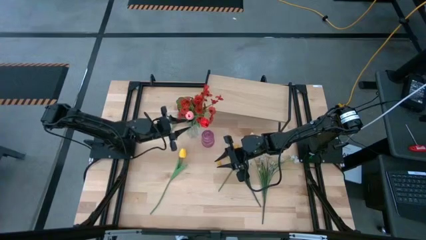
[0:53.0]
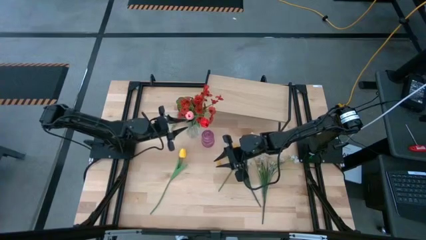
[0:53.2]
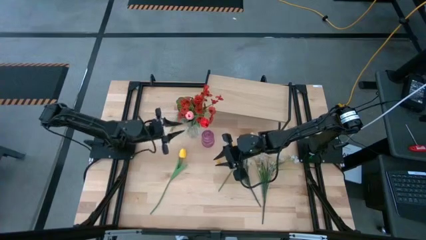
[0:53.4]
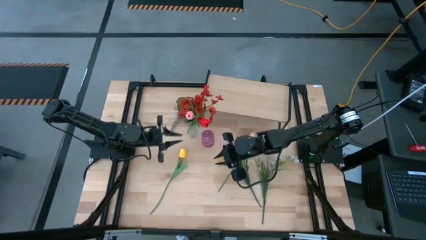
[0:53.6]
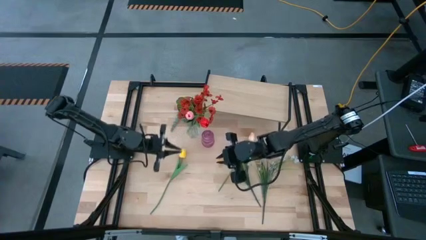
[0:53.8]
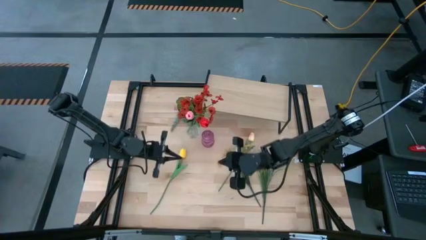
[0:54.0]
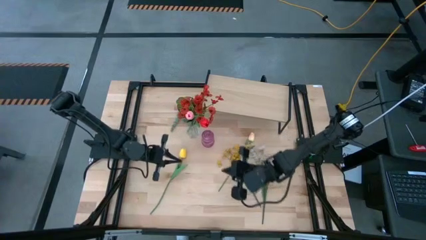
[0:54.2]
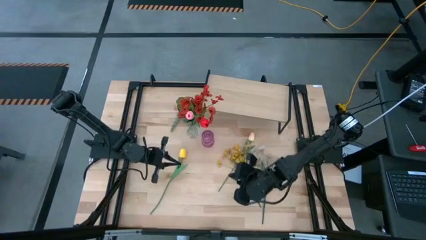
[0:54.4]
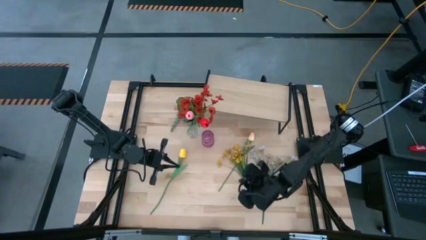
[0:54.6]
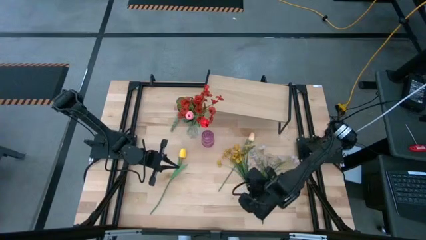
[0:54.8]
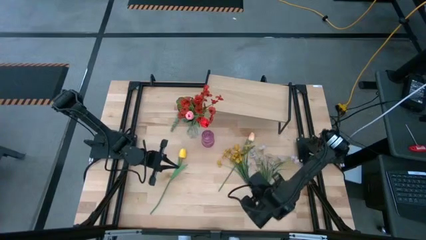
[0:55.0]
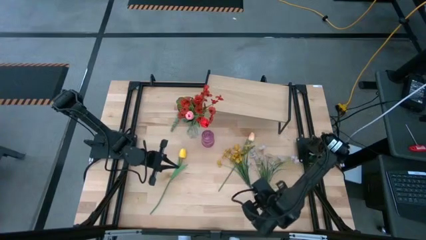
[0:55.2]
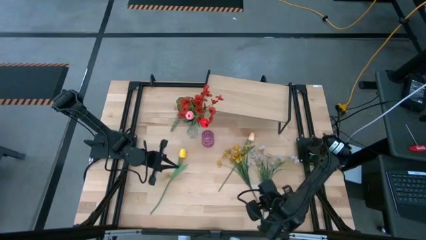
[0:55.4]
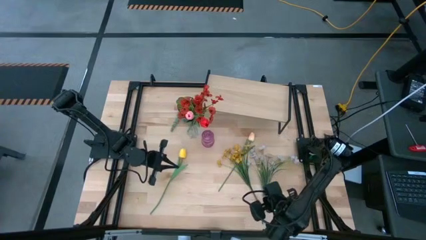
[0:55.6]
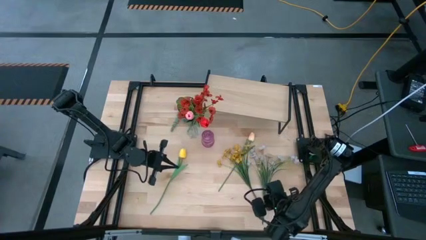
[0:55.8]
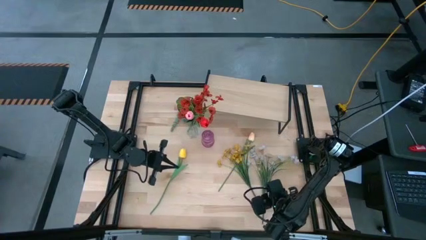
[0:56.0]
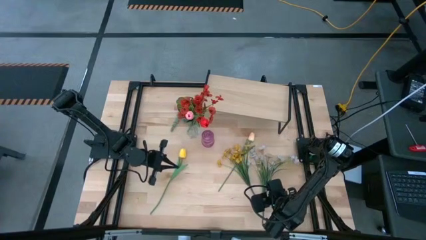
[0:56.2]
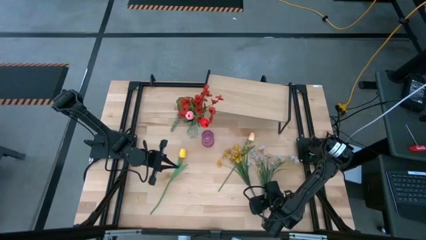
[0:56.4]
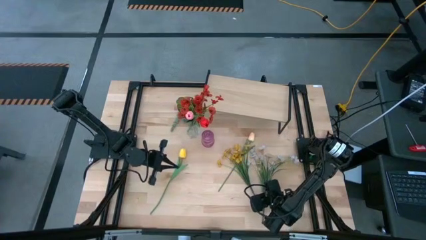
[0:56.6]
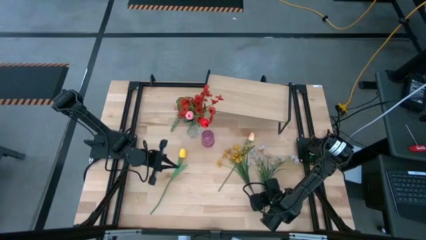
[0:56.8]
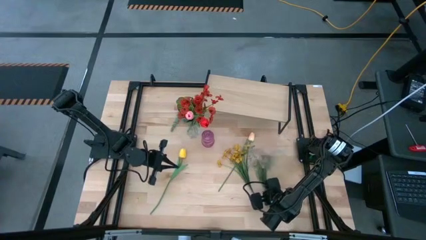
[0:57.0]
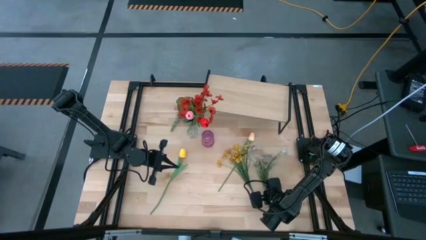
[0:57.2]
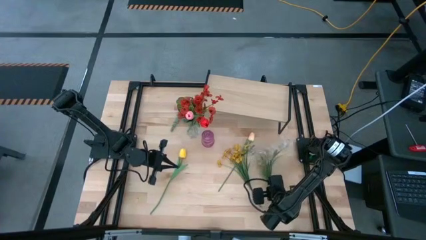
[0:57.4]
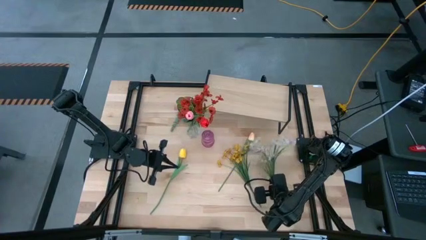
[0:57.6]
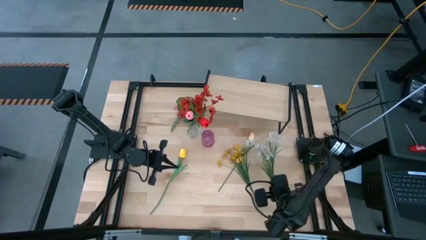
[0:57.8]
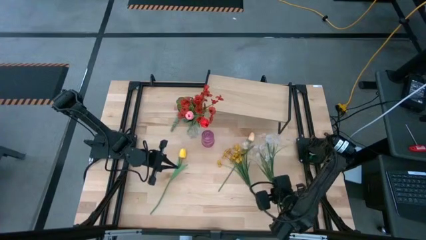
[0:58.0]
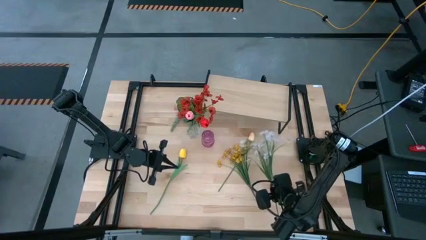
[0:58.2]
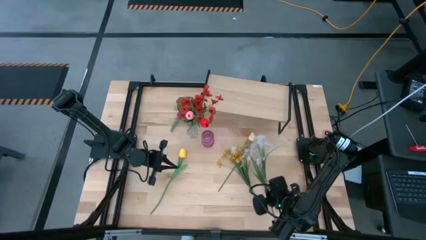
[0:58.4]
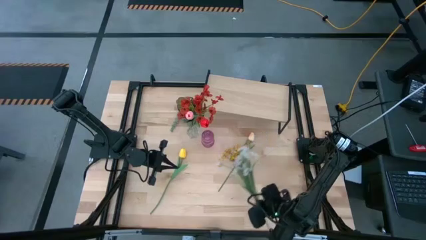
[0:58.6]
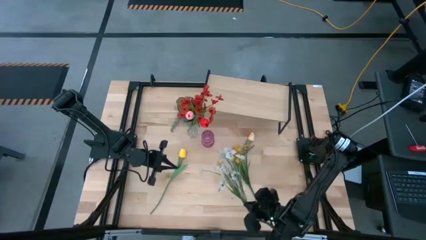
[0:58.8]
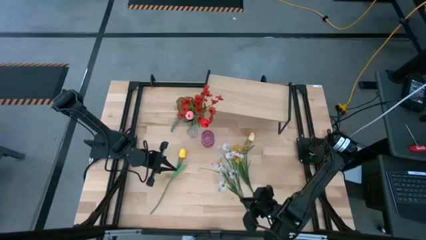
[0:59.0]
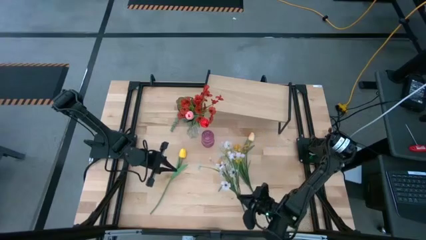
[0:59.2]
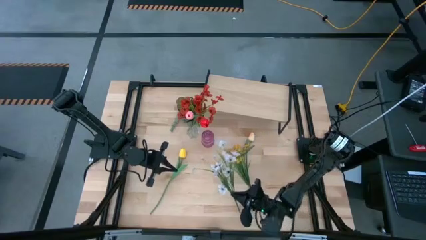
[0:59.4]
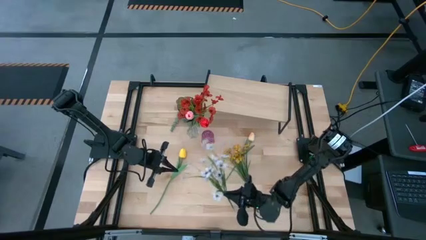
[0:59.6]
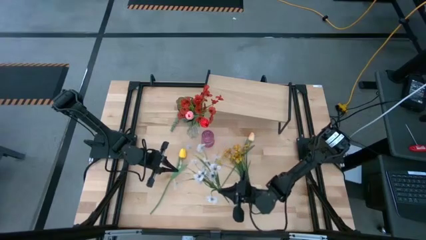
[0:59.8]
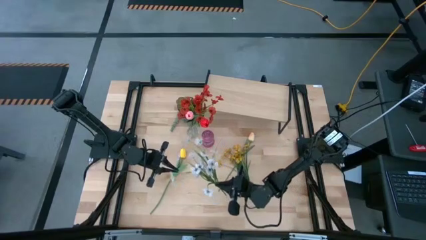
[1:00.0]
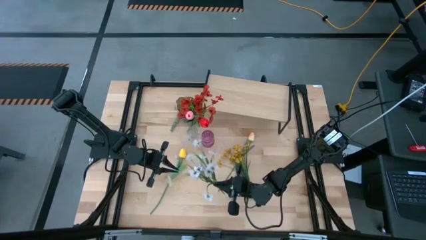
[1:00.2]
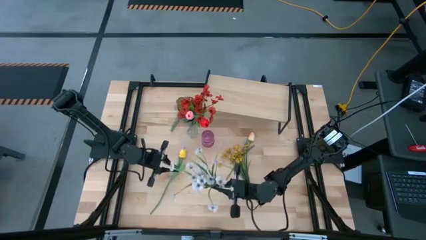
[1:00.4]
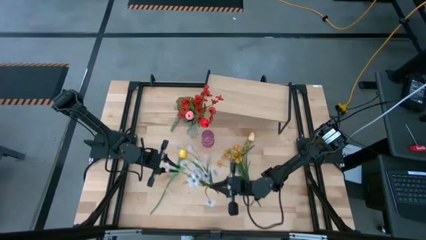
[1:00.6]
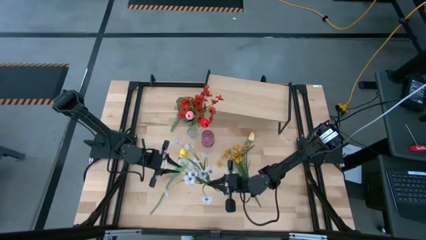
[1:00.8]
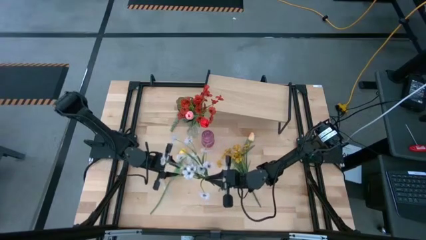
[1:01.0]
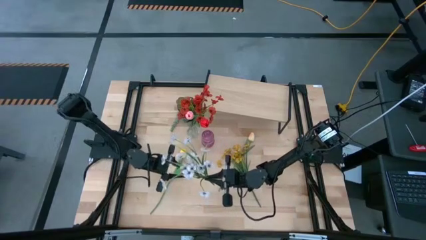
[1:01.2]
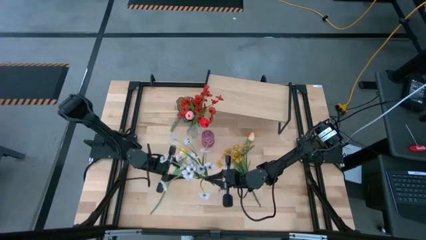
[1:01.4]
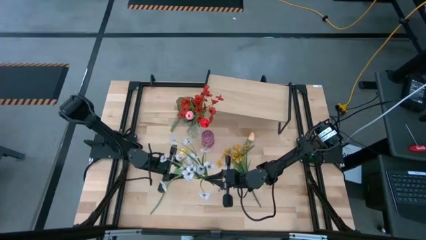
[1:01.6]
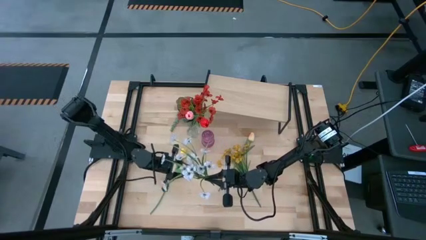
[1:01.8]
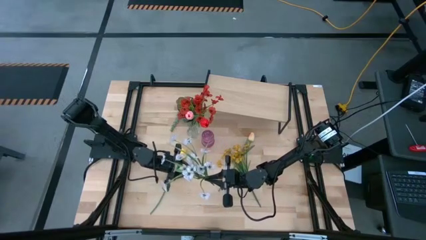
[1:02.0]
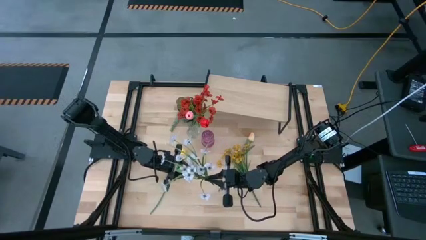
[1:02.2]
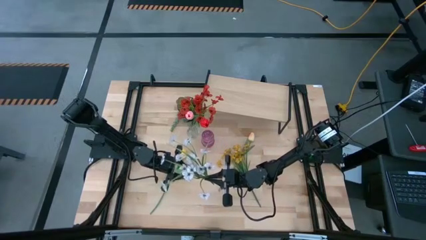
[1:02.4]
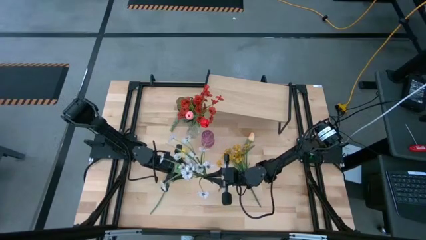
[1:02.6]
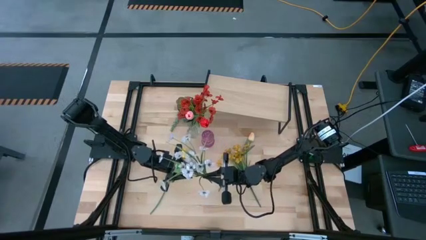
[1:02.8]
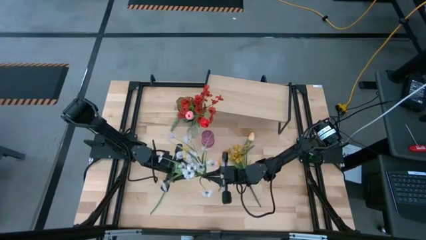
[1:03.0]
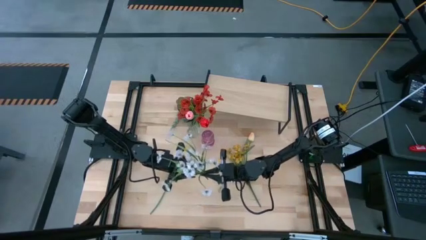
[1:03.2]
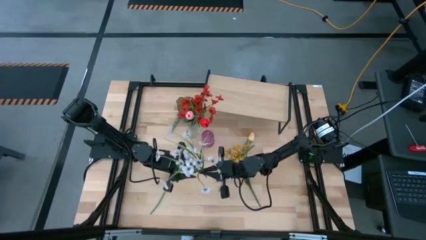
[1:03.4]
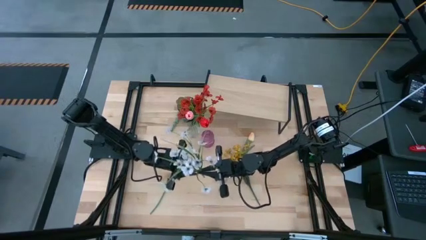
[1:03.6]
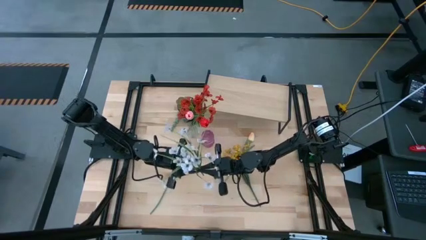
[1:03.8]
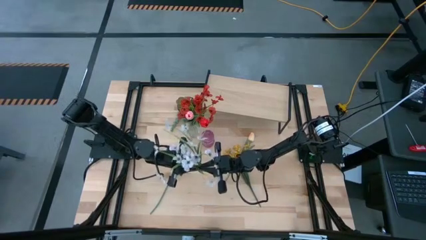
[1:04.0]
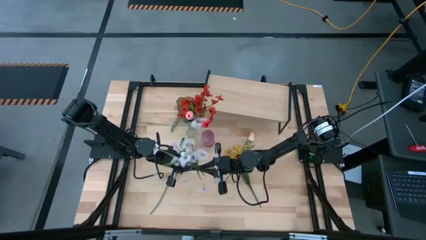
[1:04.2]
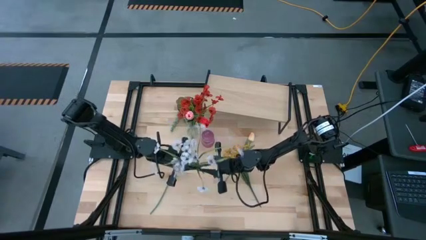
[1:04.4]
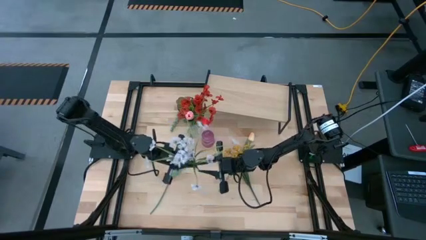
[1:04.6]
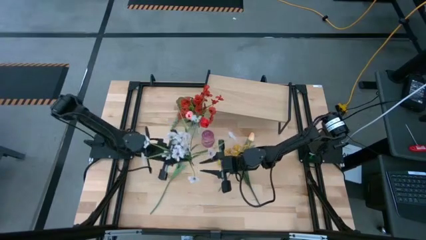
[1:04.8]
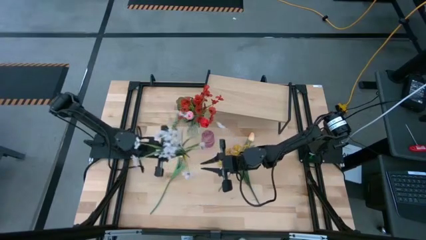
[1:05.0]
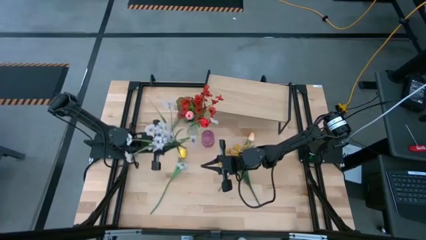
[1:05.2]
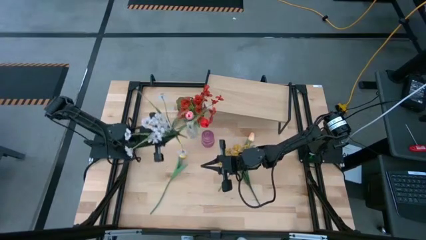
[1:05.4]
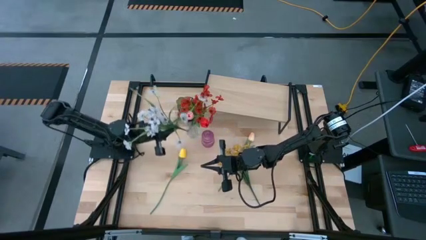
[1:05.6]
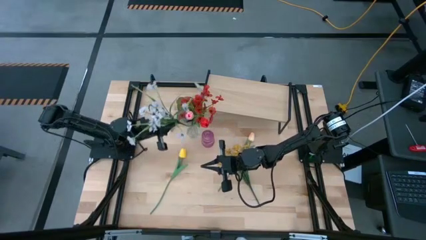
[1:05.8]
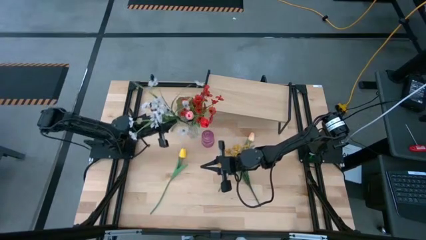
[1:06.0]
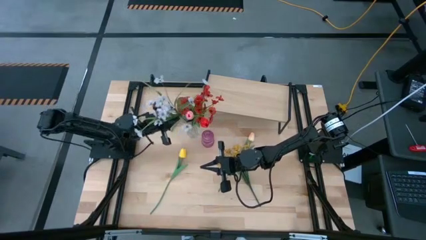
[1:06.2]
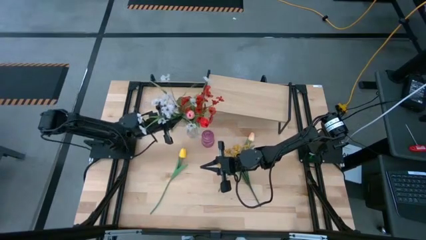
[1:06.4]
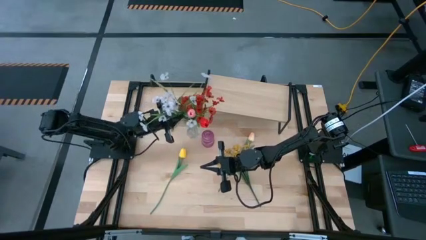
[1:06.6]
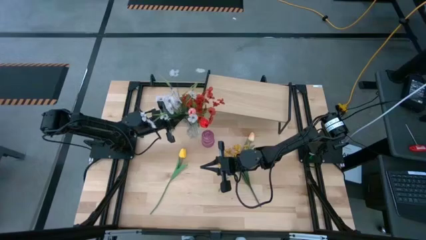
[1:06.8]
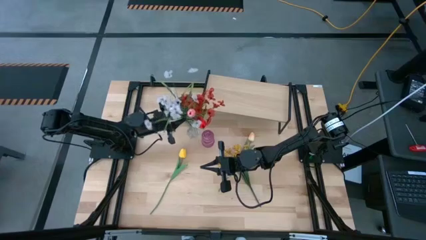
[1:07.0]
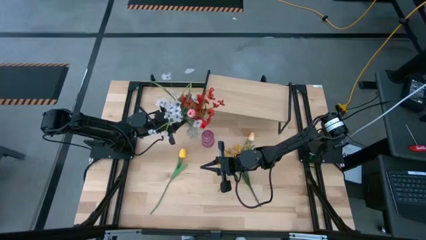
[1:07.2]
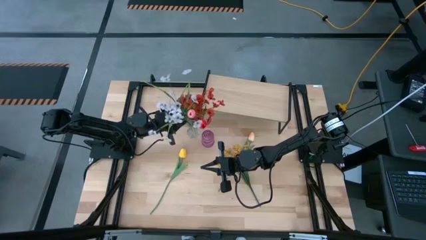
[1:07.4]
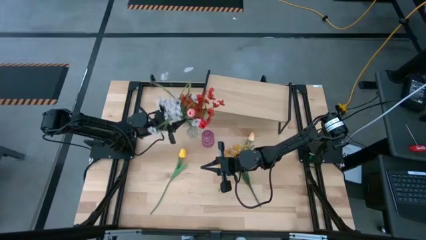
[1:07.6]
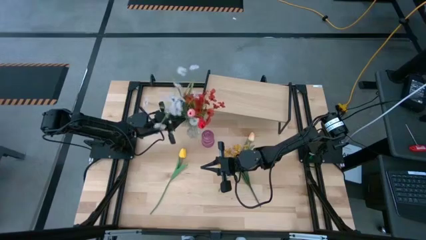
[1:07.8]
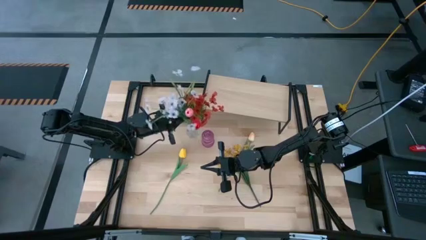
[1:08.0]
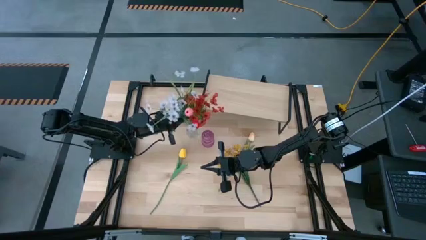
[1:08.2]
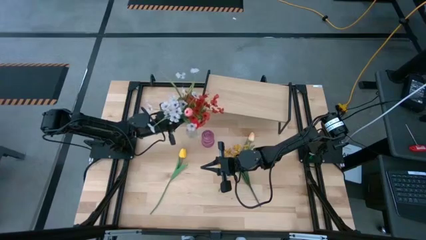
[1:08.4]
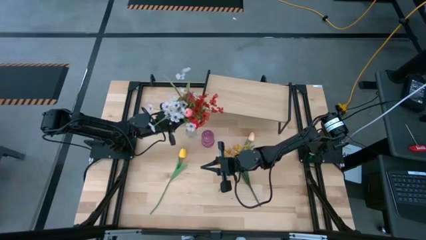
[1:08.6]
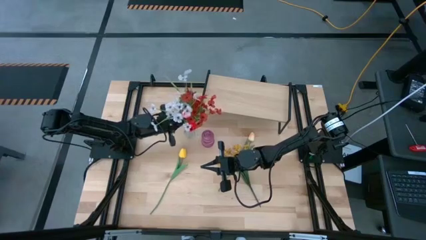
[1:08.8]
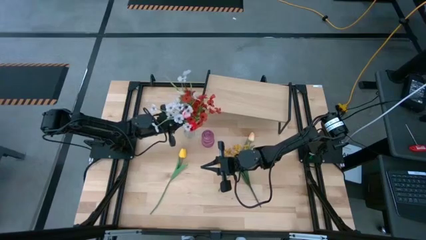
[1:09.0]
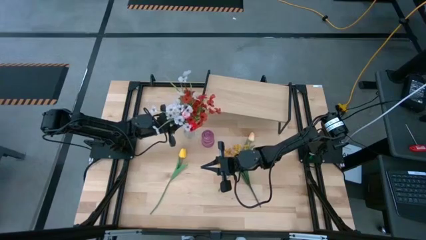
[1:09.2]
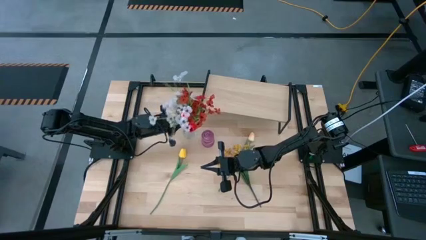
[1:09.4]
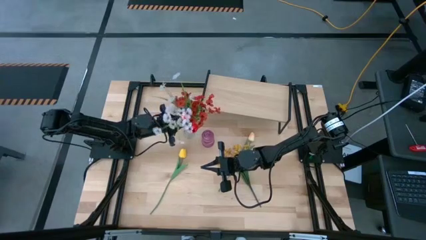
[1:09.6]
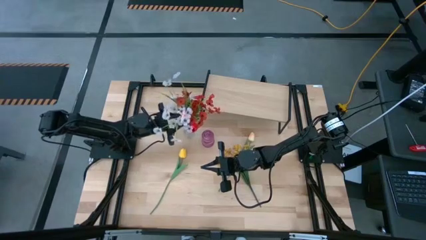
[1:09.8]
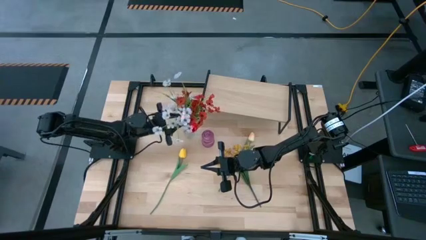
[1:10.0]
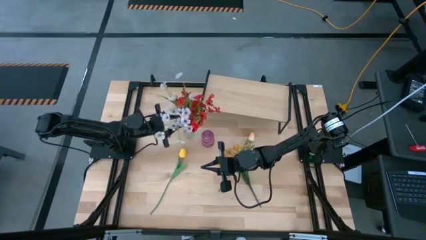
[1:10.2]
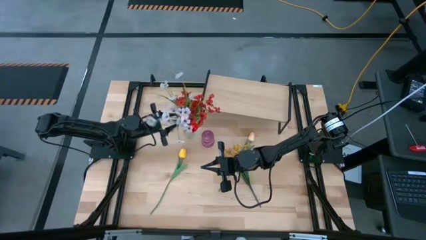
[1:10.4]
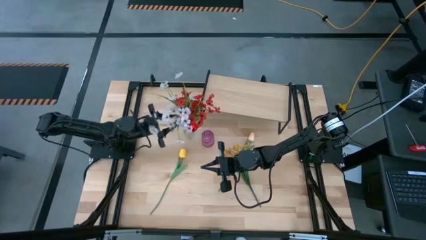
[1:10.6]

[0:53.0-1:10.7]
Task: Pick and place flowers into a vace then onto a shelf
Put the white flowers into the transparent vase
